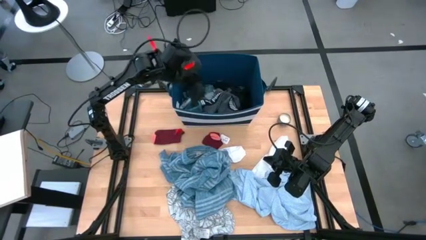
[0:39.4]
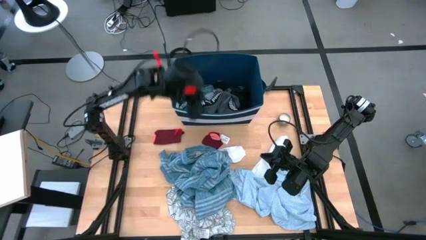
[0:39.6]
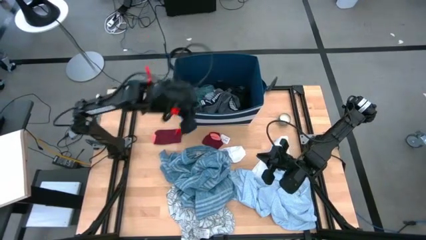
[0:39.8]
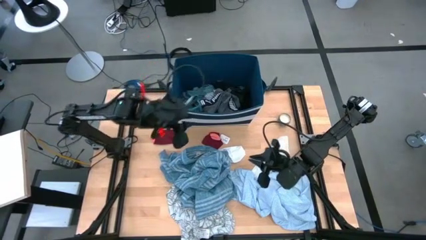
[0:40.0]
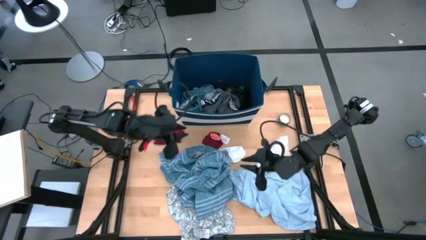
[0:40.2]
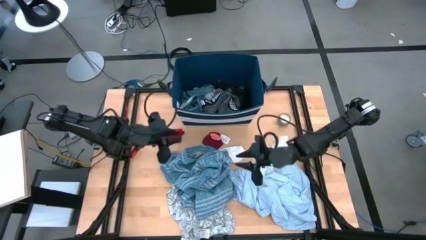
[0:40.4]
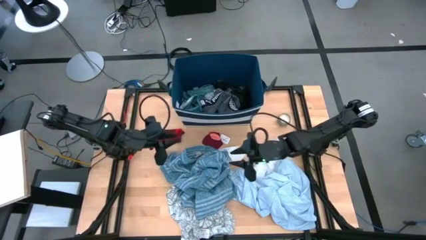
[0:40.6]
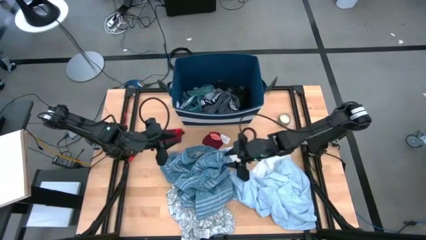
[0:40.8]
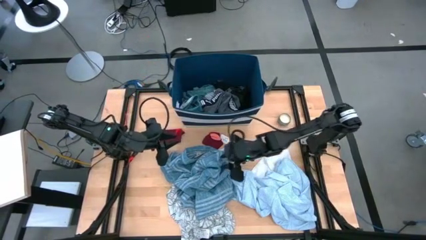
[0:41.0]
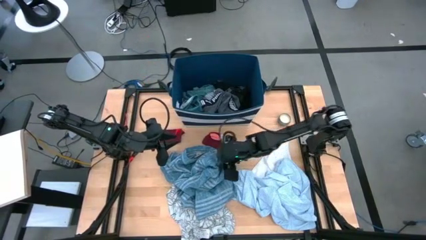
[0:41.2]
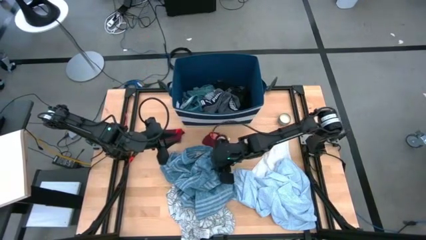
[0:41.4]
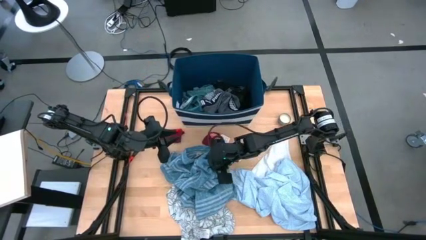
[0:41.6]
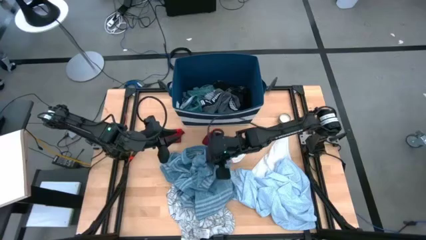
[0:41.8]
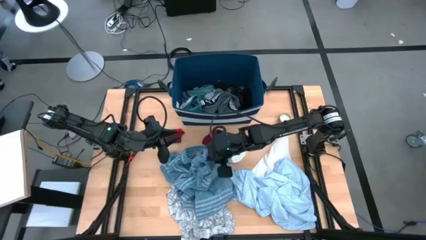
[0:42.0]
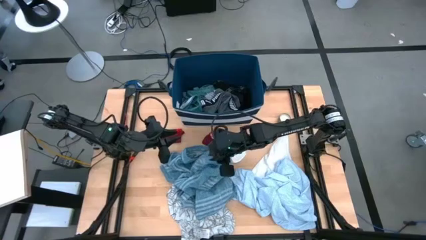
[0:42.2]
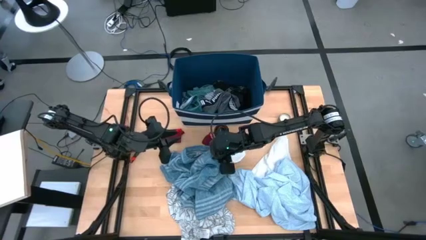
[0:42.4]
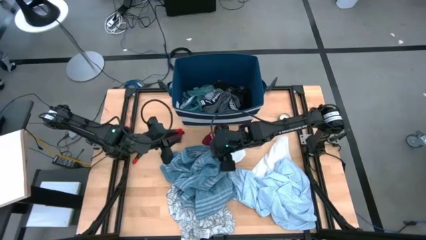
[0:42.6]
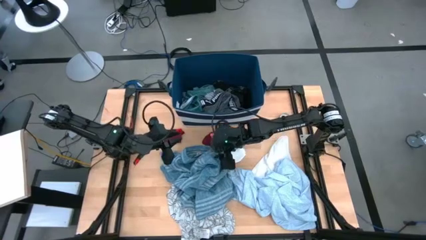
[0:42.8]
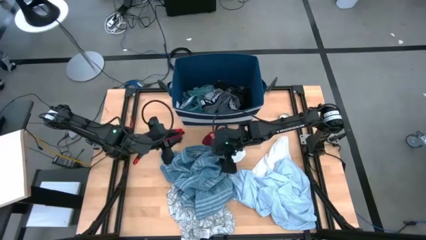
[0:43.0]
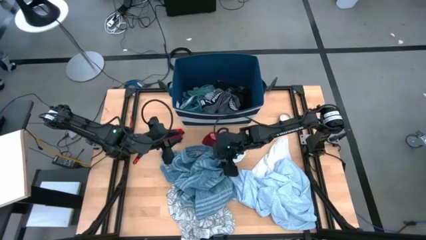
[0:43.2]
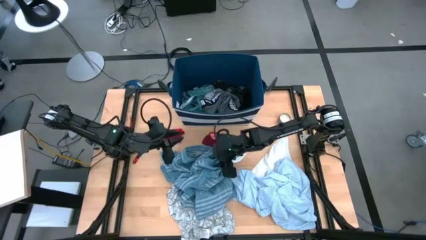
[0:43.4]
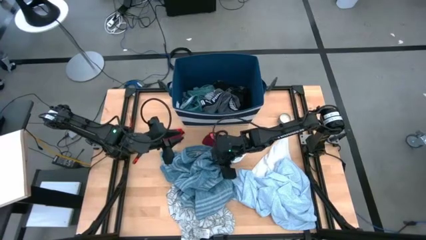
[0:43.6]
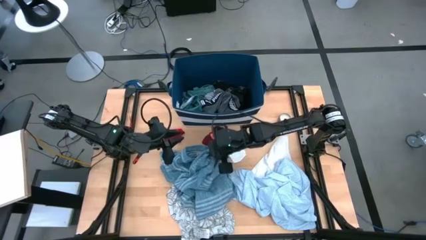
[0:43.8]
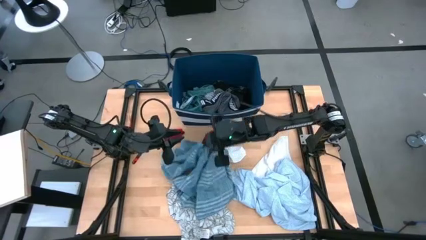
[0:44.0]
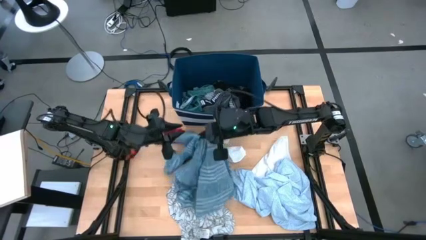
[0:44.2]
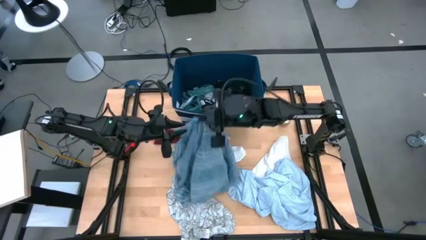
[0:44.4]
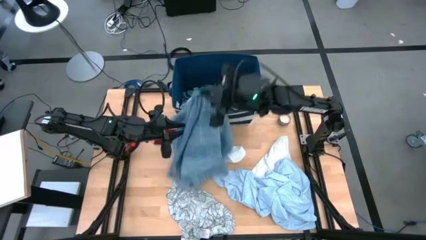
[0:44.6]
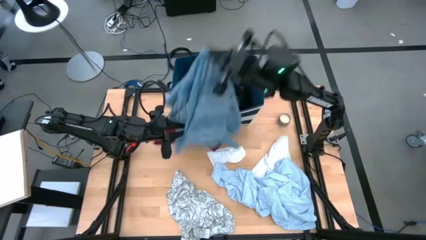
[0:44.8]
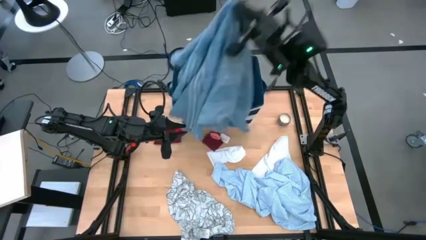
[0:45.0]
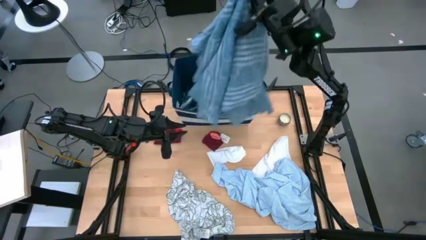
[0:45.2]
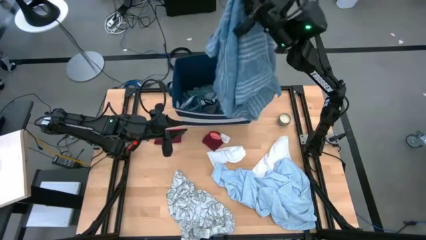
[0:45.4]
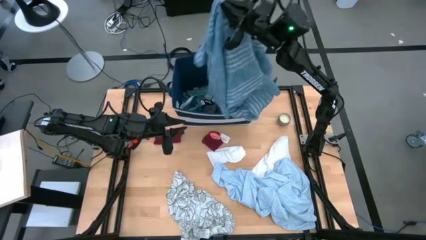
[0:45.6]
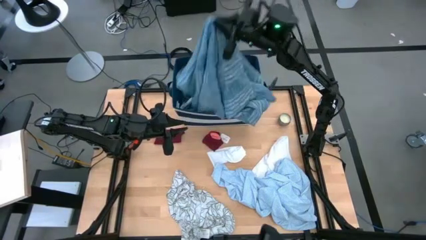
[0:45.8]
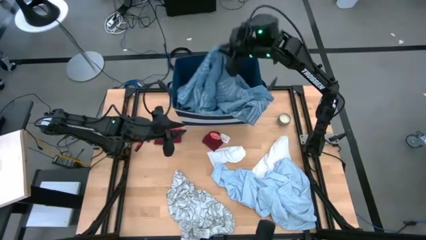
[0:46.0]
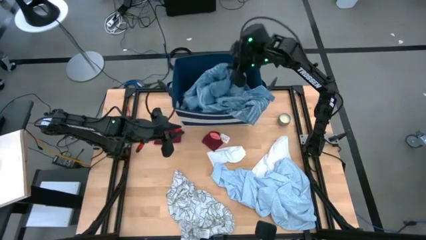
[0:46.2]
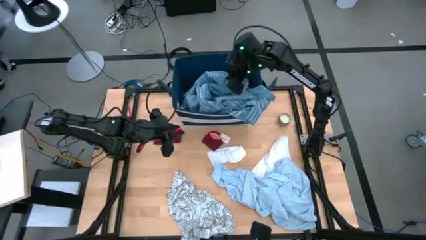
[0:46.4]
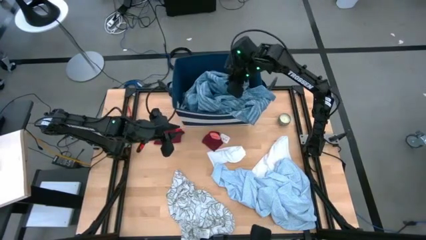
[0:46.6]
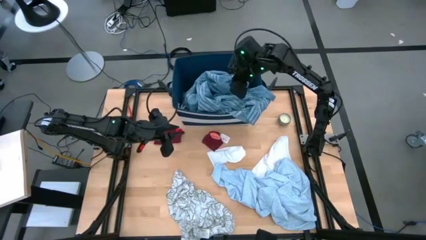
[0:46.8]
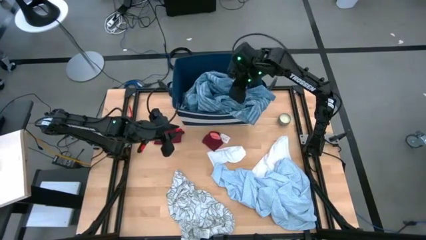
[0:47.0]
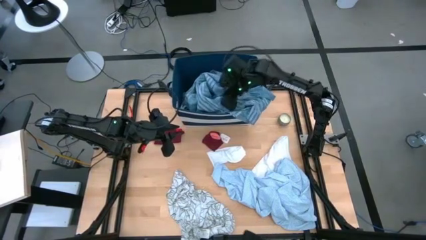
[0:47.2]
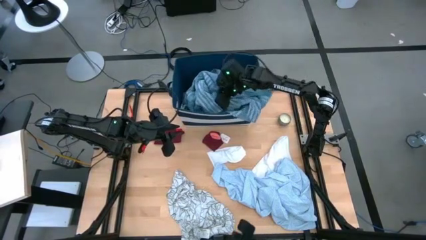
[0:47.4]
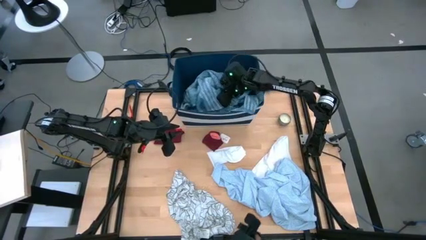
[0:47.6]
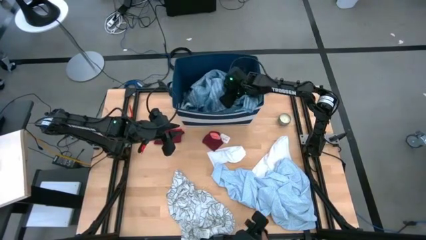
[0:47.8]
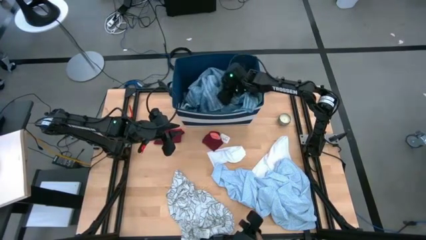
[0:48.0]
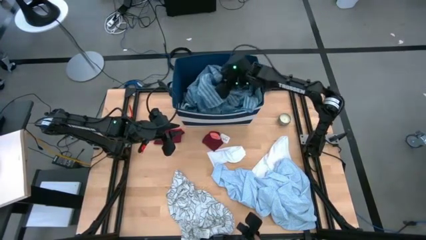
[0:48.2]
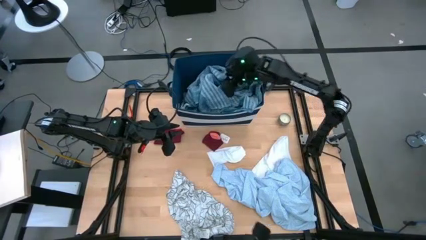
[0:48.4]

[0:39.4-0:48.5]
Task: Sort clothes
Put the blue polo shirt into the blue bin

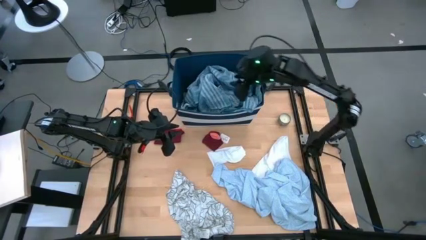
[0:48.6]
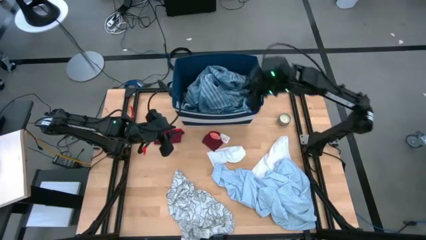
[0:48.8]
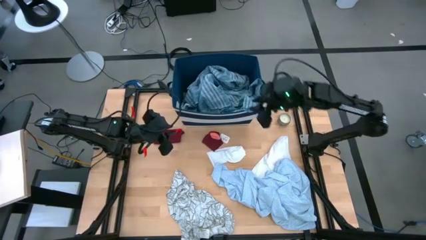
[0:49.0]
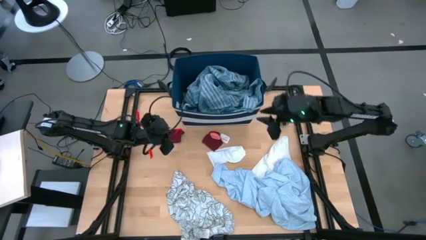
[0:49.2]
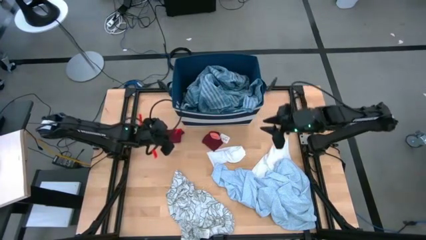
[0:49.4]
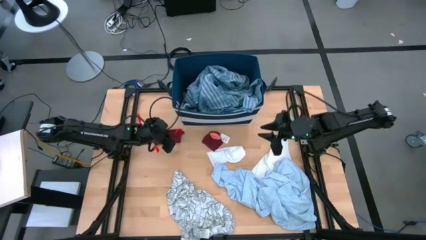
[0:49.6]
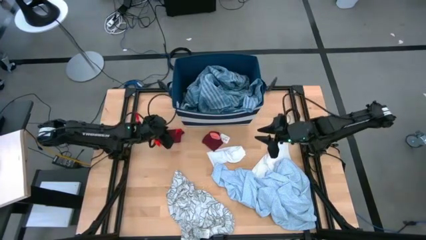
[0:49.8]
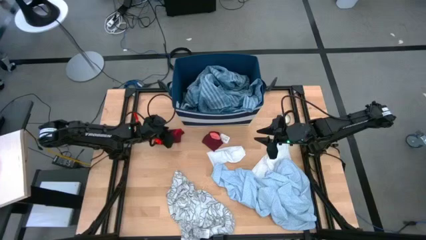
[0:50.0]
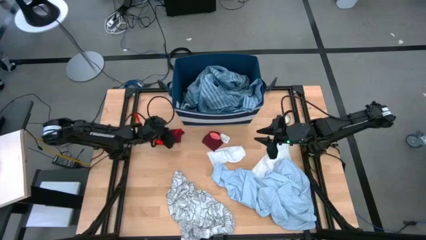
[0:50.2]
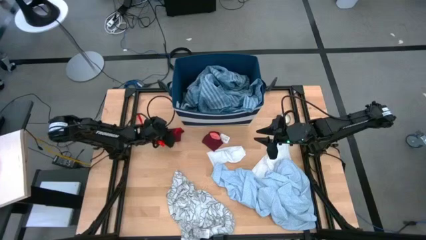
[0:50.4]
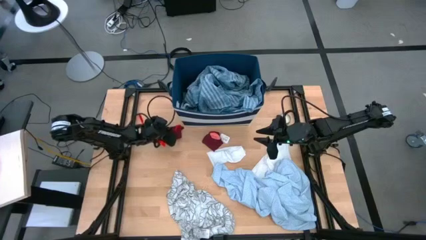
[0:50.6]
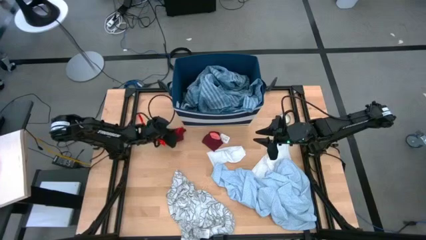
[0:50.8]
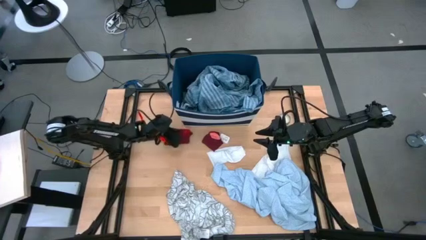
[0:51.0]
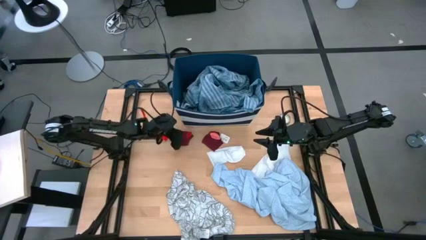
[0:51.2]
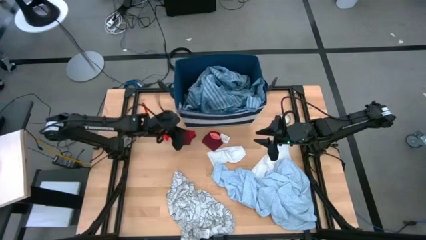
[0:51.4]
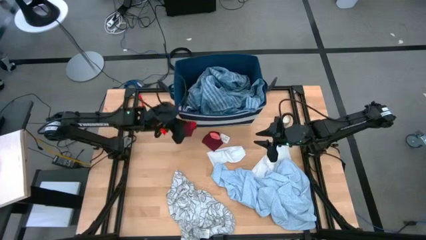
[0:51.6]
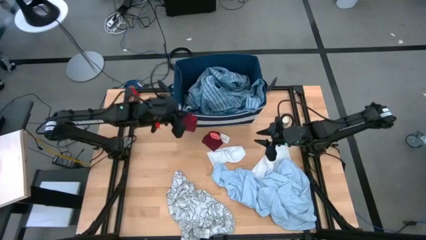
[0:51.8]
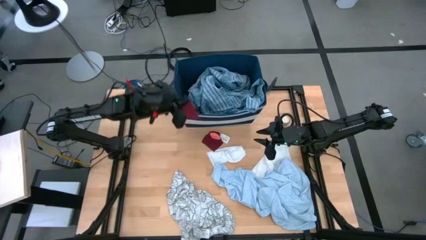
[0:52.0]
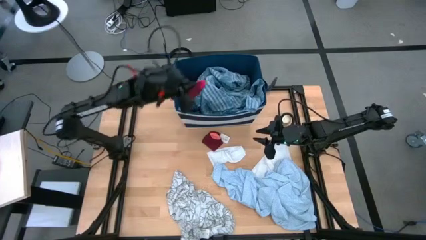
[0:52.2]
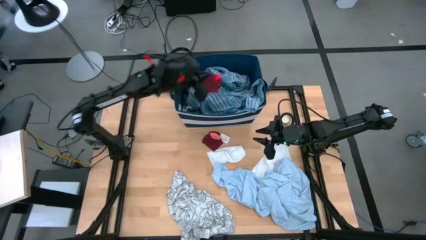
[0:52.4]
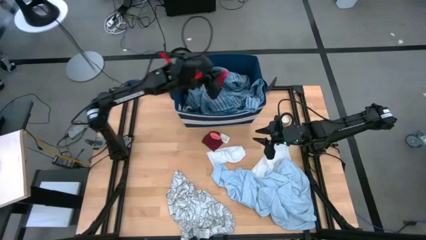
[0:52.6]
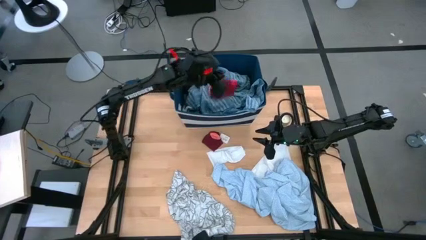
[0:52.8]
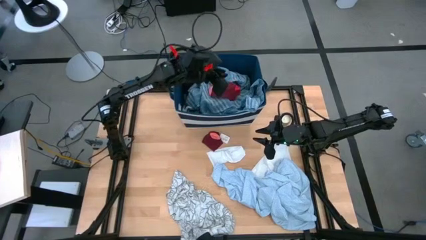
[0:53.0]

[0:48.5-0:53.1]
Put the red socks into the blue bin

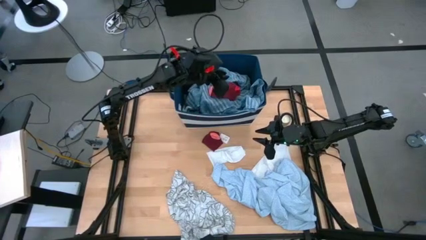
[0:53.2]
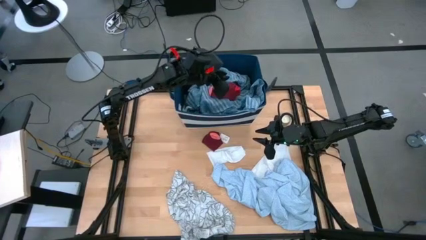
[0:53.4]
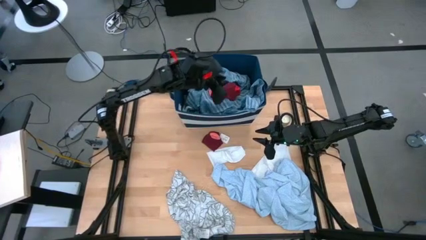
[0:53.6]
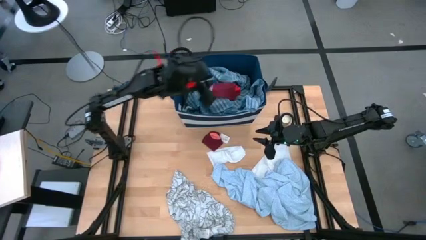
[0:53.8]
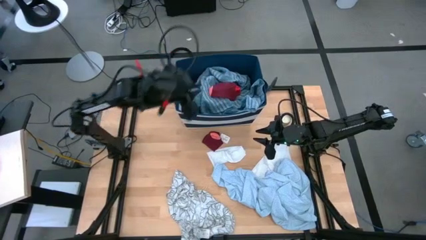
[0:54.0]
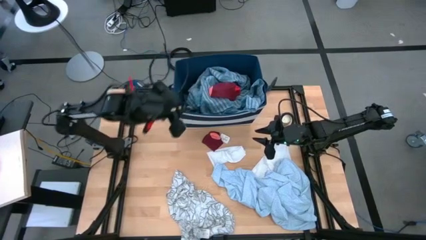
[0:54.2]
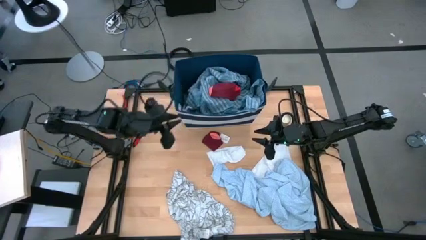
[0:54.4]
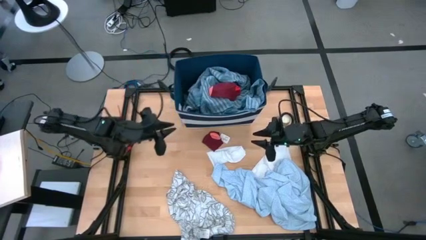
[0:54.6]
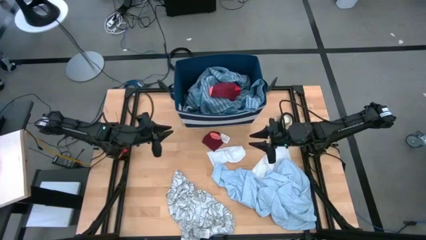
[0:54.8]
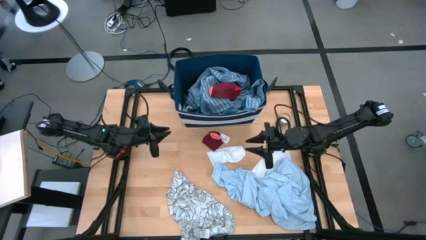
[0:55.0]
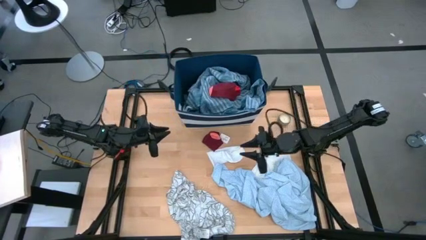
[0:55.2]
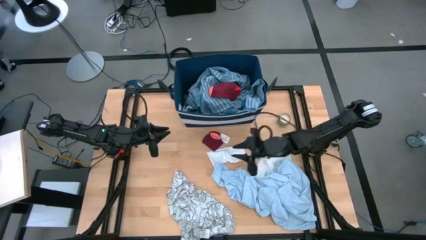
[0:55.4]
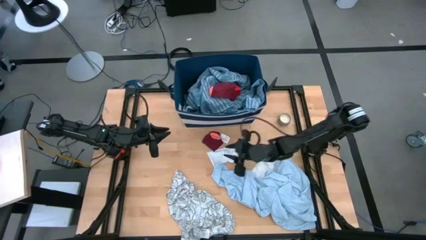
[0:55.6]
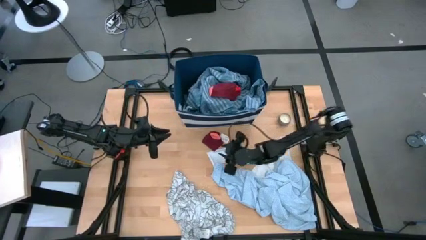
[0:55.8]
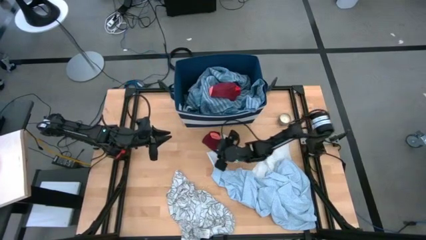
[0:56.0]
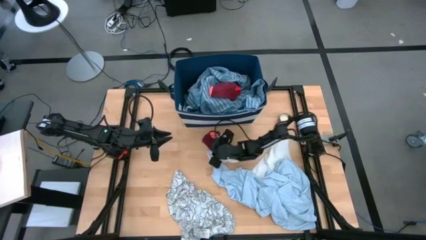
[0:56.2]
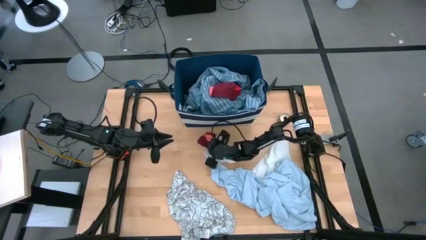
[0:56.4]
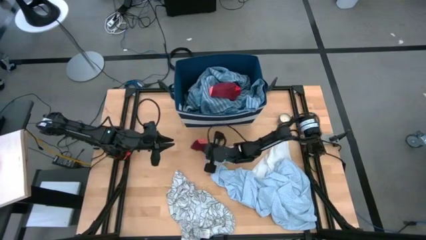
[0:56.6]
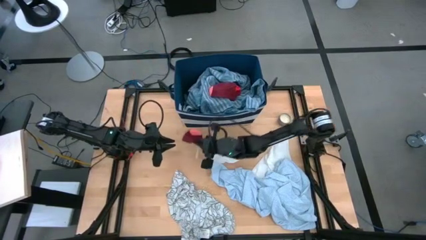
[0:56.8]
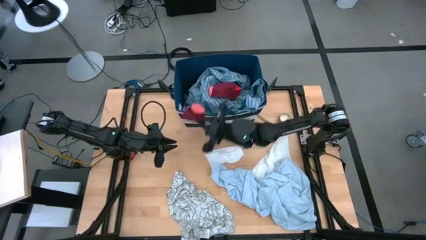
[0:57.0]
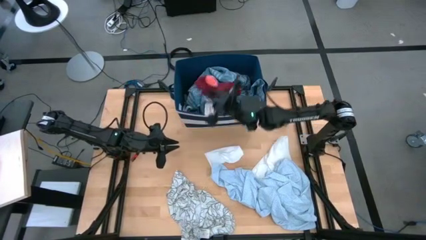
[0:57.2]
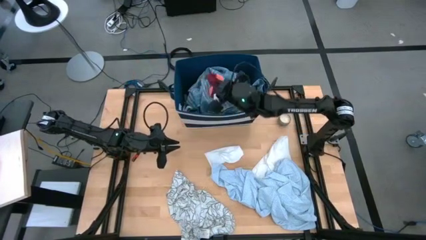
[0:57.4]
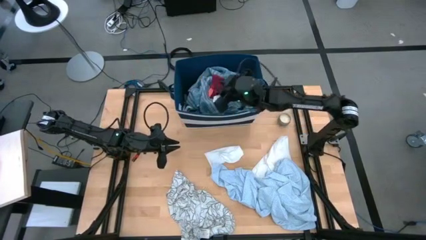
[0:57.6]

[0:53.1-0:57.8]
Put the red socks into the blue bin
